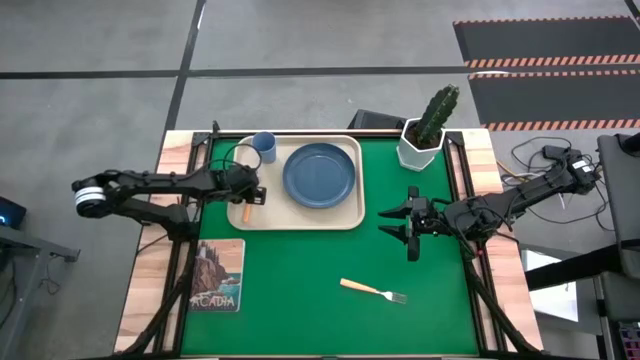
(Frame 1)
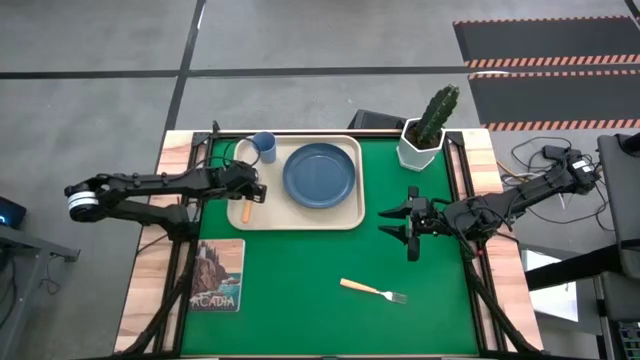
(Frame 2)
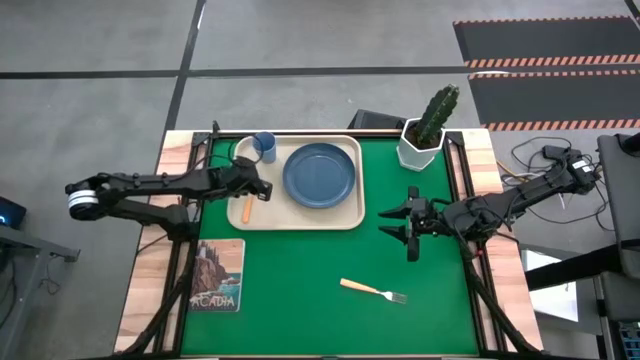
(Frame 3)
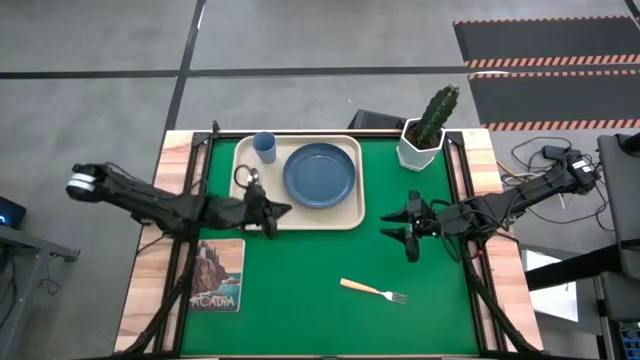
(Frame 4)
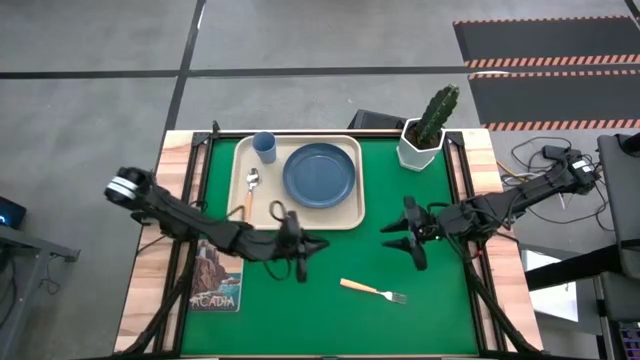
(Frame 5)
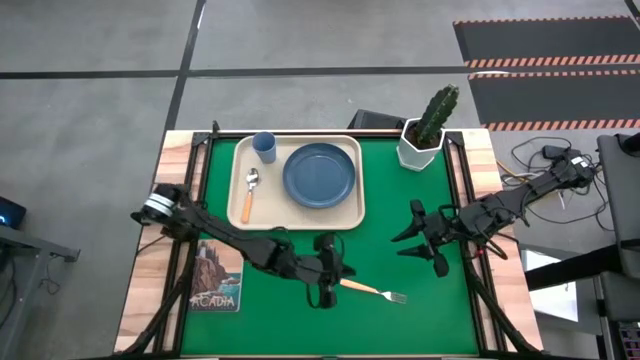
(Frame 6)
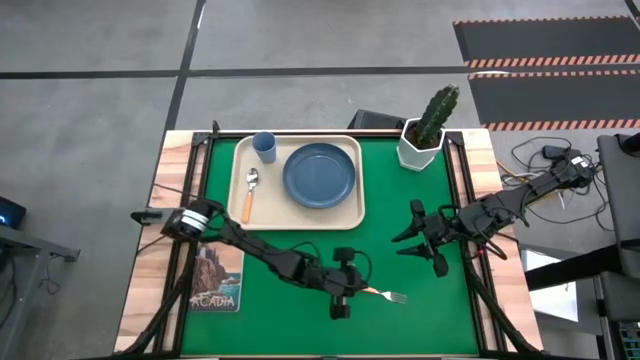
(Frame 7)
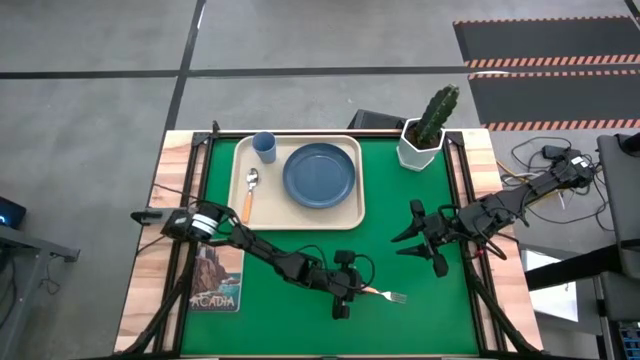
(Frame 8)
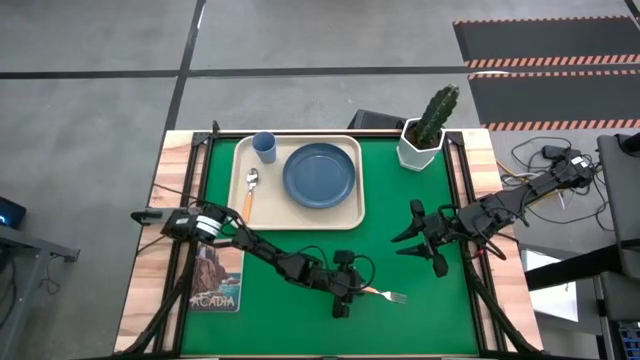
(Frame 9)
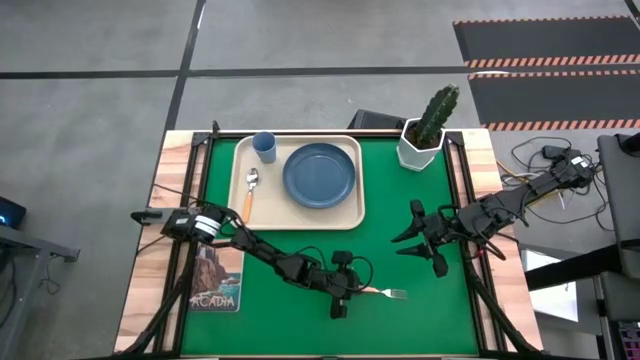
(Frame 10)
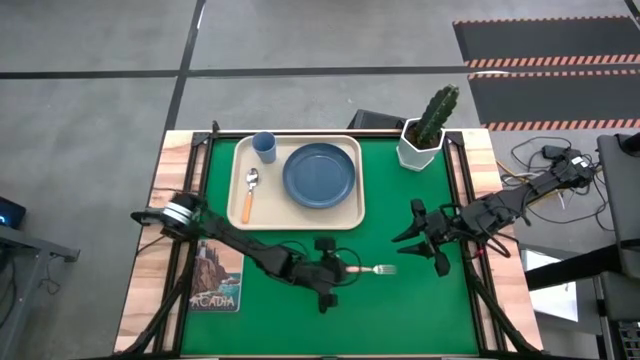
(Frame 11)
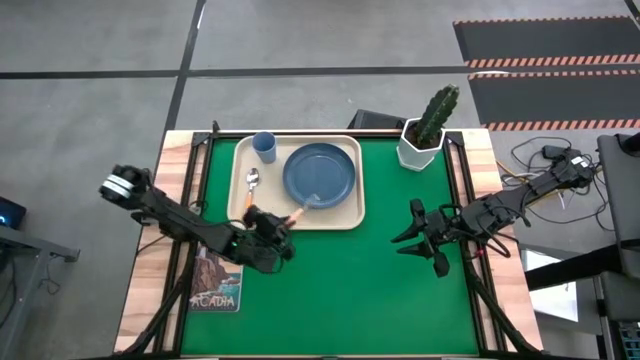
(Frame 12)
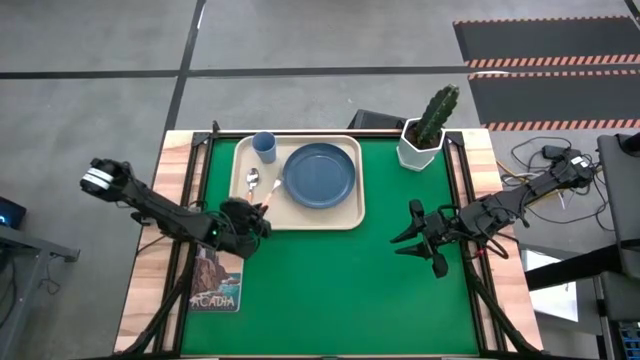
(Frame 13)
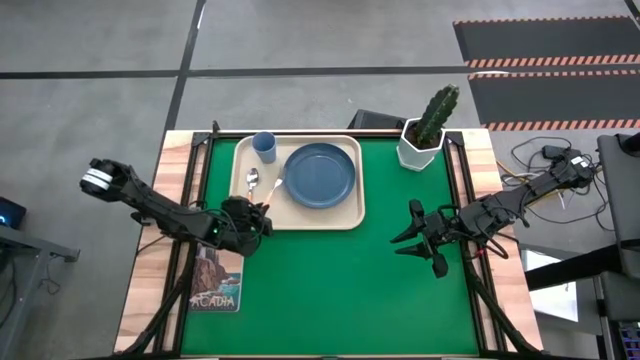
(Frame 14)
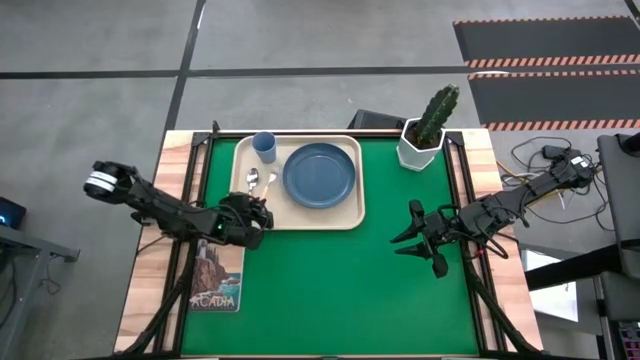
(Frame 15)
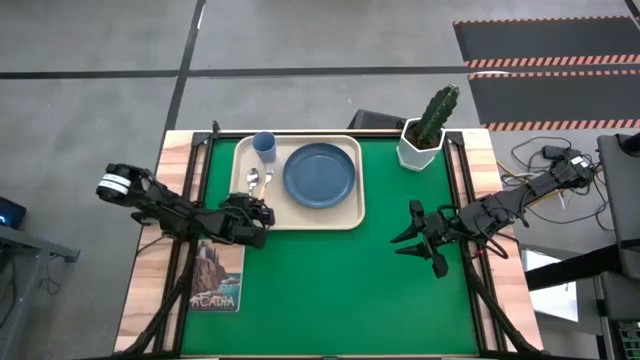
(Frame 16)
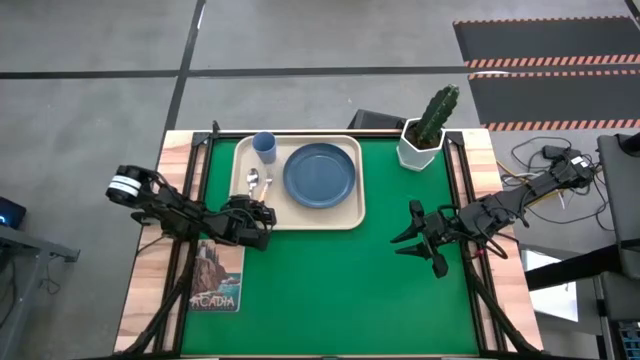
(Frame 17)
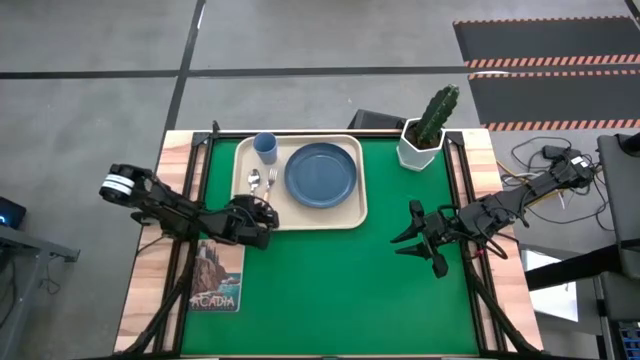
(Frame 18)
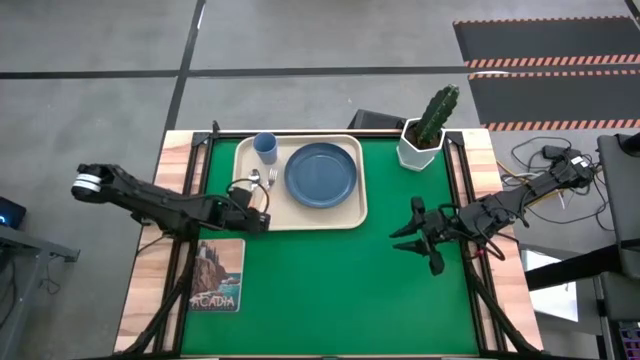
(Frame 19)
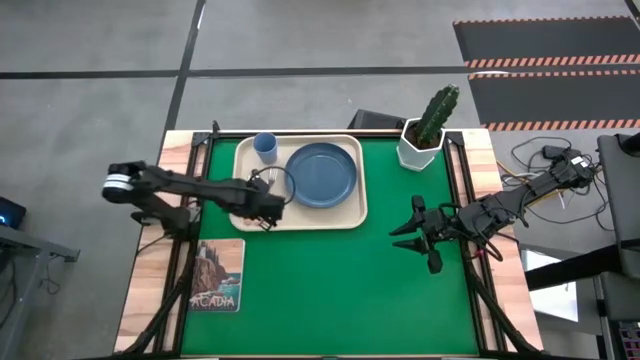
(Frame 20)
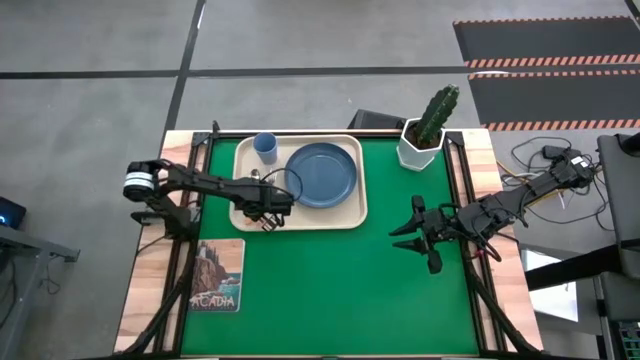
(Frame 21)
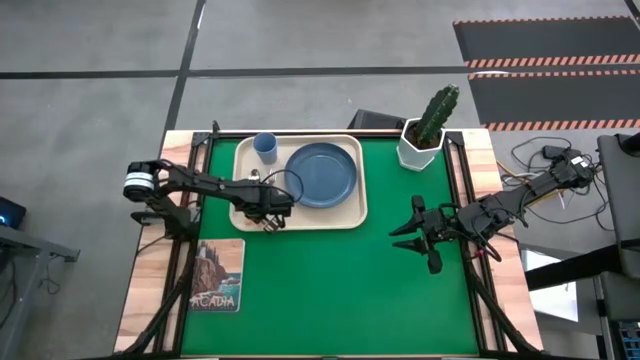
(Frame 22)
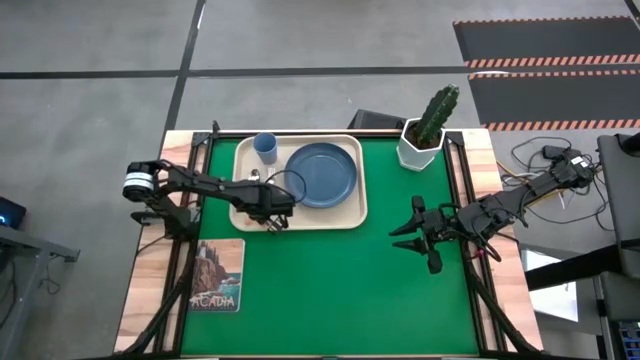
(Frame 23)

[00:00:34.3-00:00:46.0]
Task: Pick and place plate/cup/fork/spoon on tray
Put the orange fork on the white tray to the right of the orange spoon

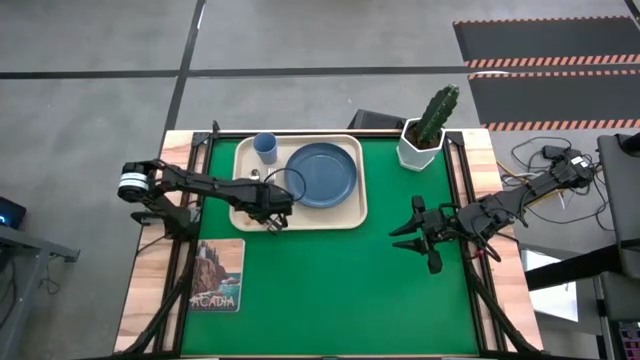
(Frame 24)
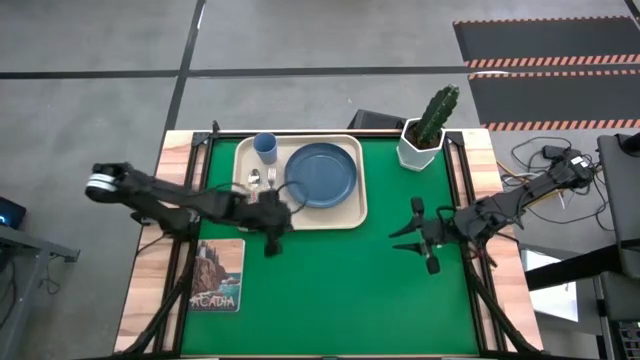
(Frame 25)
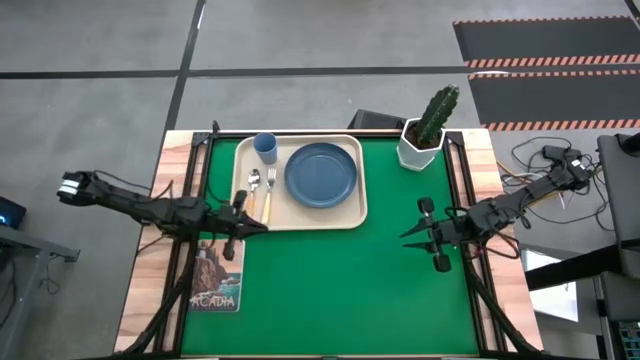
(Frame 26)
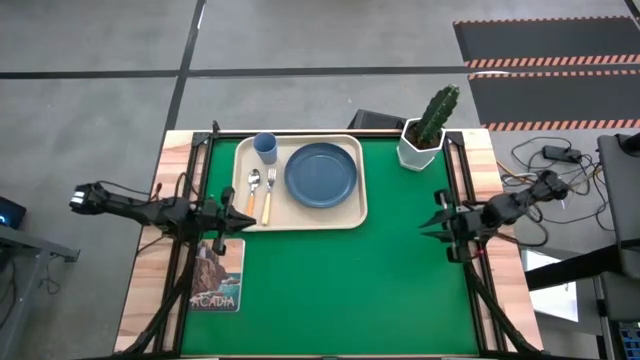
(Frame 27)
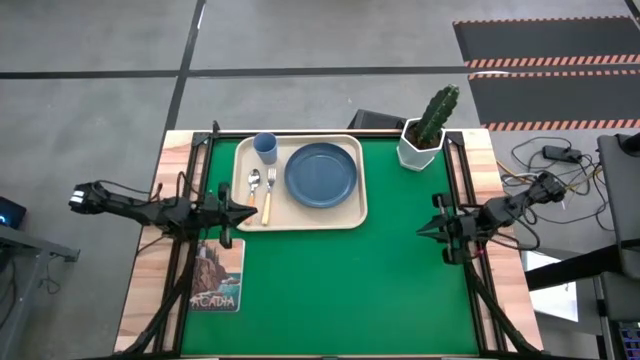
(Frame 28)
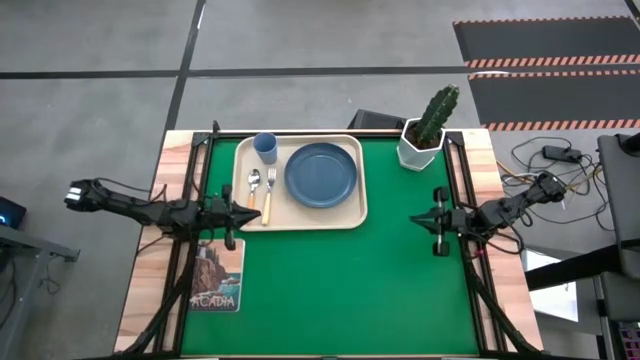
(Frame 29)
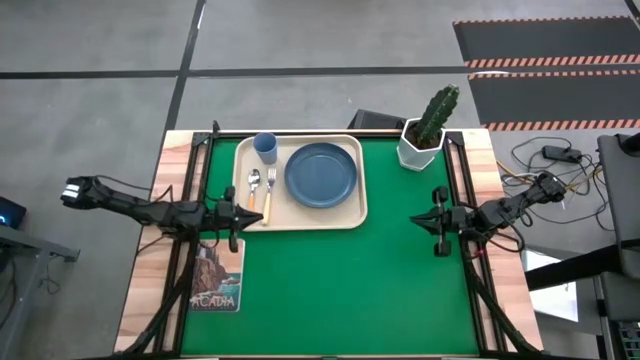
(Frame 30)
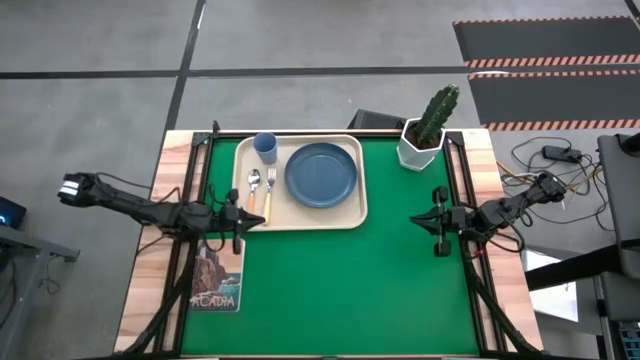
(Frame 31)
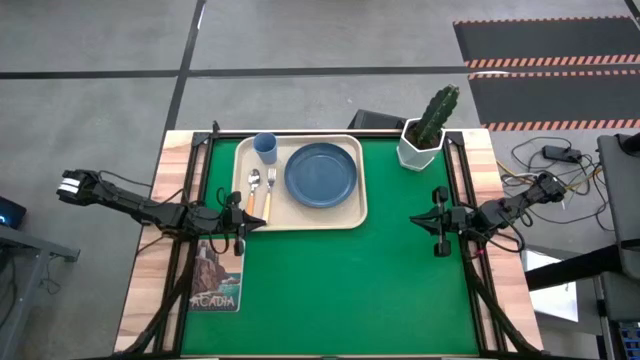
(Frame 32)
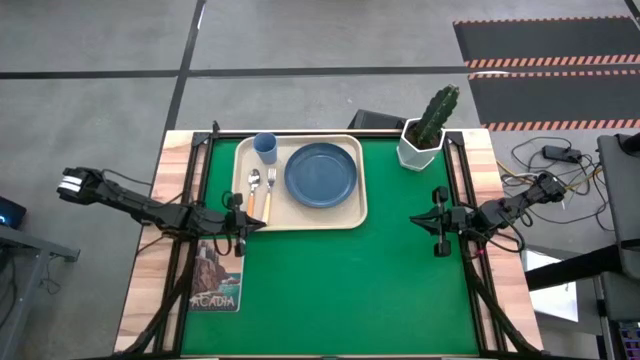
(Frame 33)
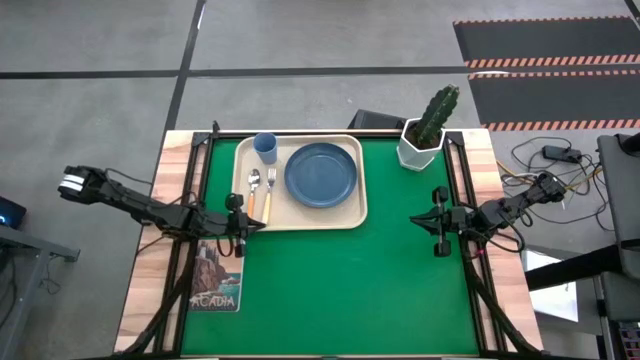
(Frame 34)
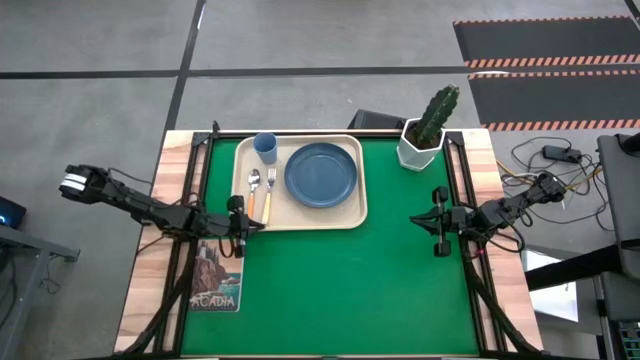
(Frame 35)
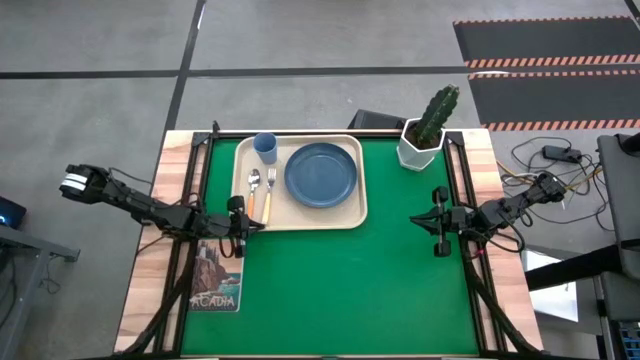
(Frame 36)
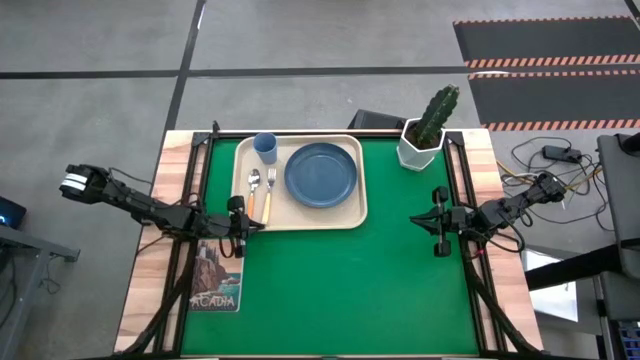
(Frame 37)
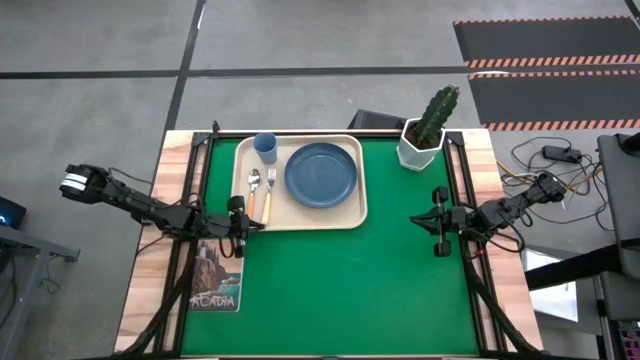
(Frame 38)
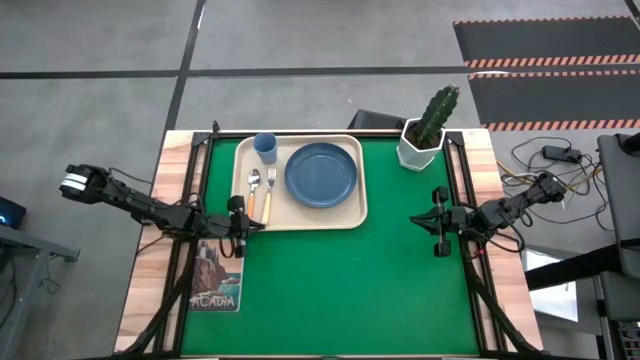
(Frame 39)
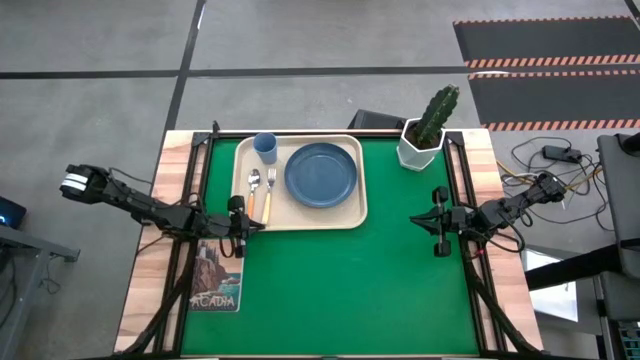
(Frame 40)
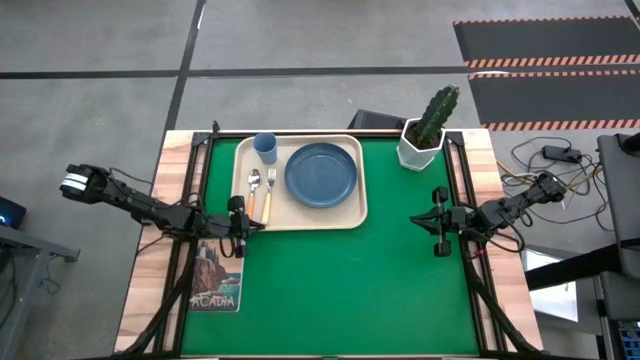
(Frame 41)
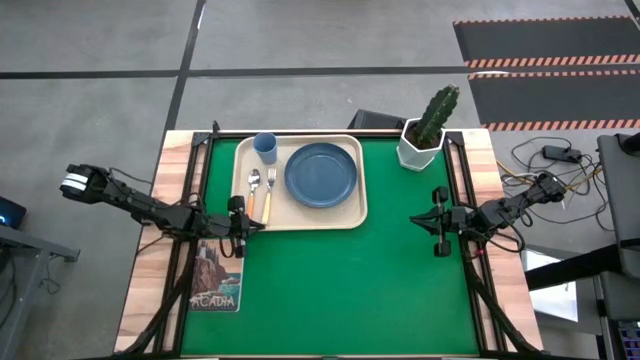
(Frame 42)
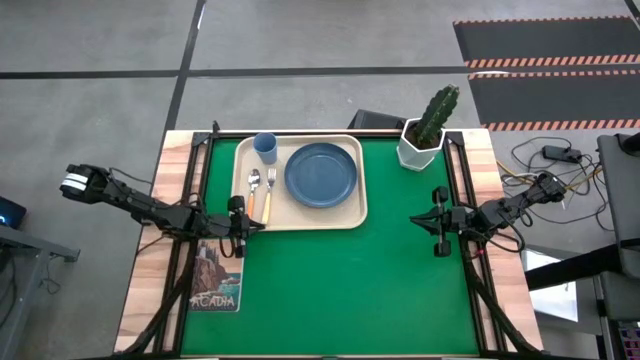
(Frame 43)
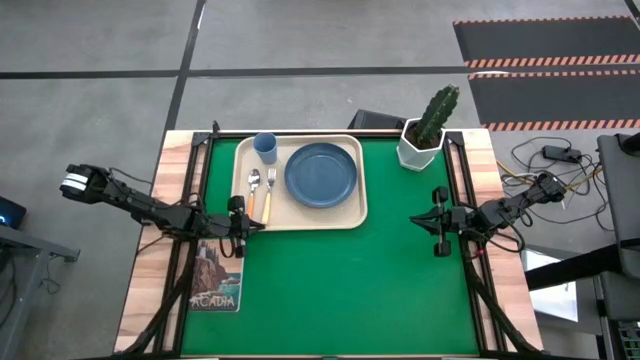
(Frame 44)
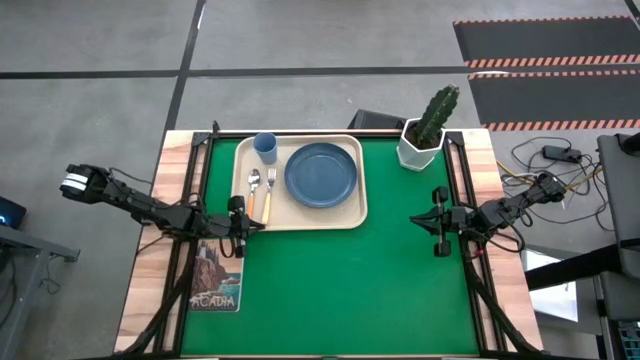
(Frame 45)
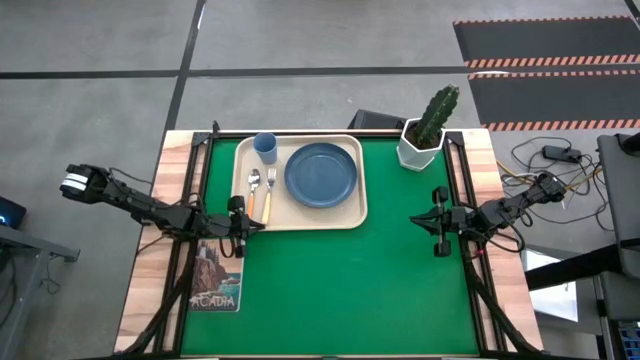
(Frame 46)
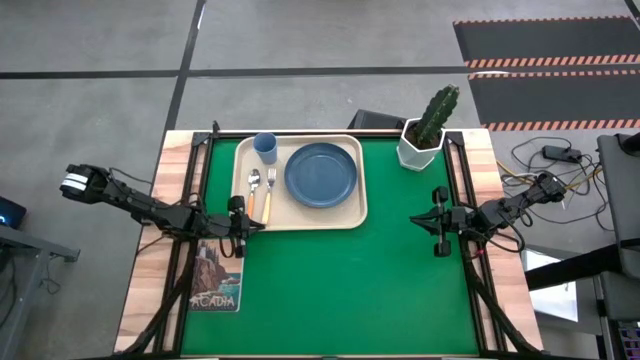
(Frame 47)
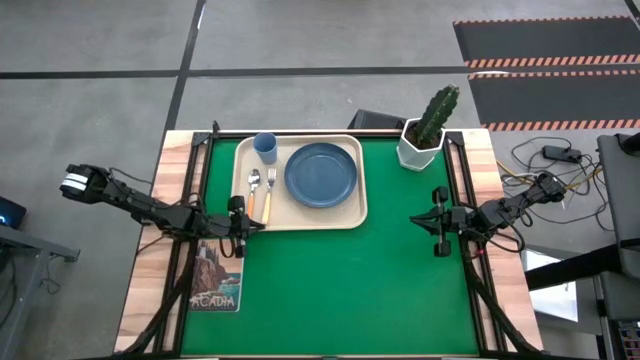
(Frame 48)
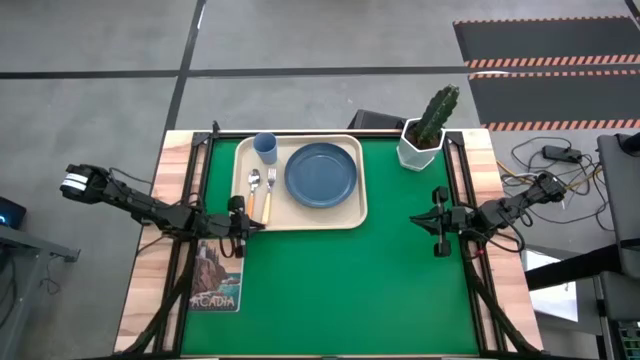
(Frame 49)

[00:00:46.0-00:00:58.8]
Return to Home Position
